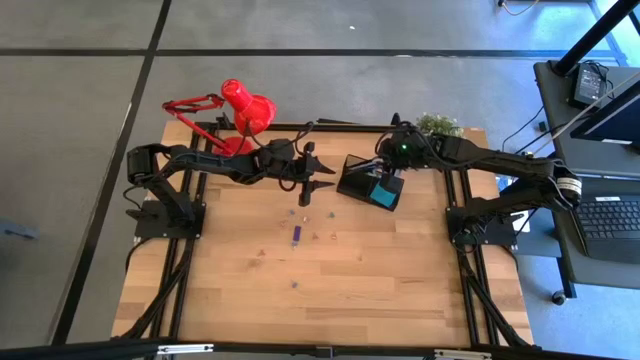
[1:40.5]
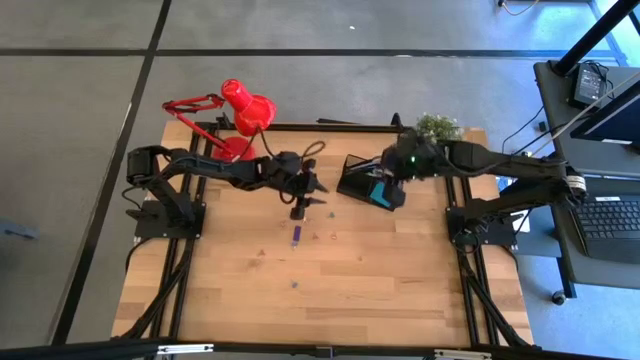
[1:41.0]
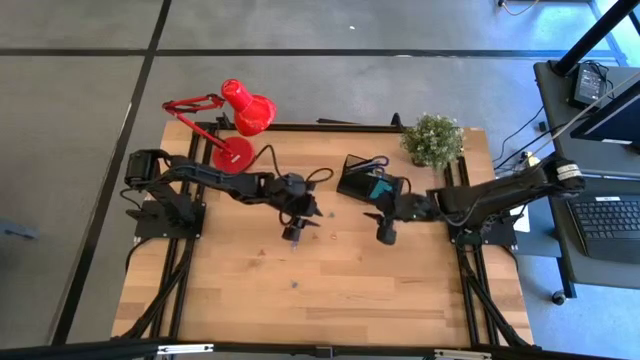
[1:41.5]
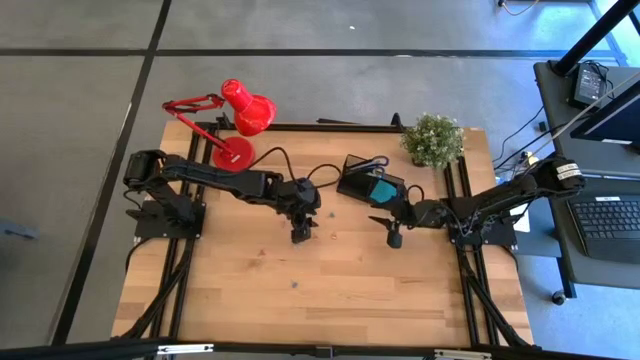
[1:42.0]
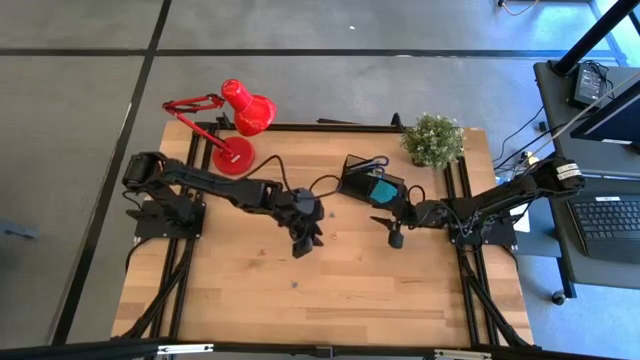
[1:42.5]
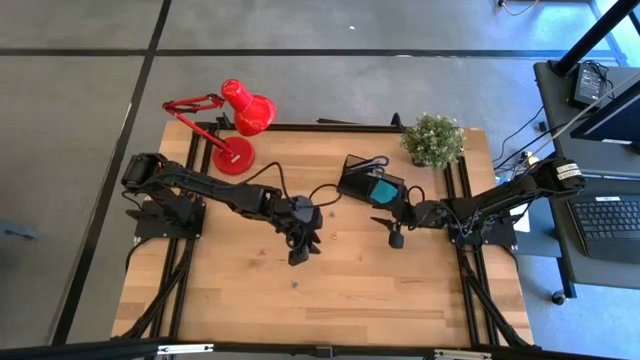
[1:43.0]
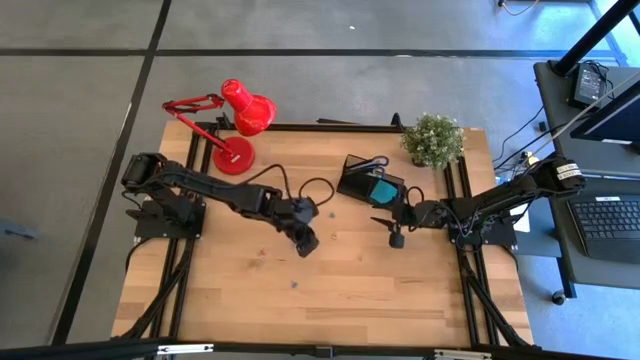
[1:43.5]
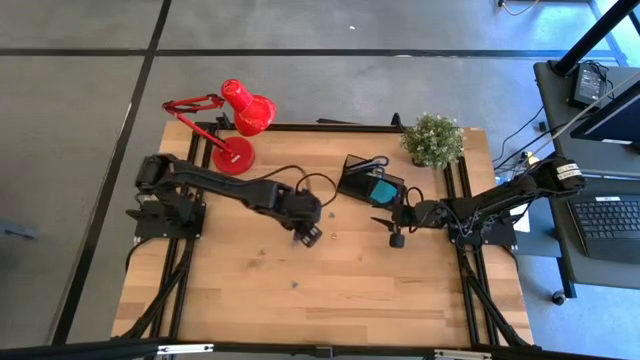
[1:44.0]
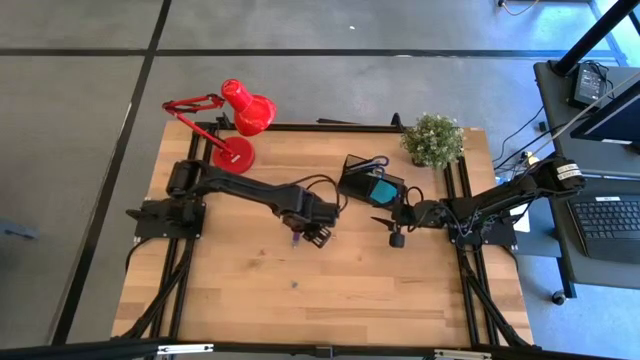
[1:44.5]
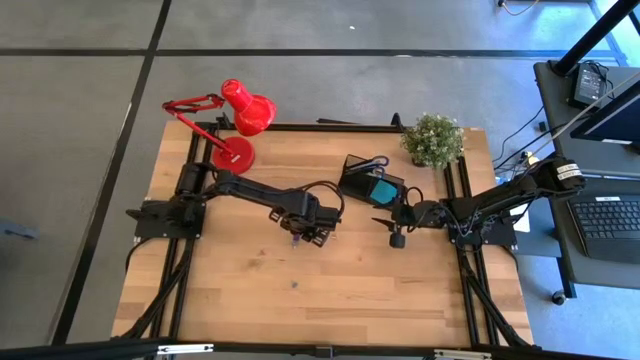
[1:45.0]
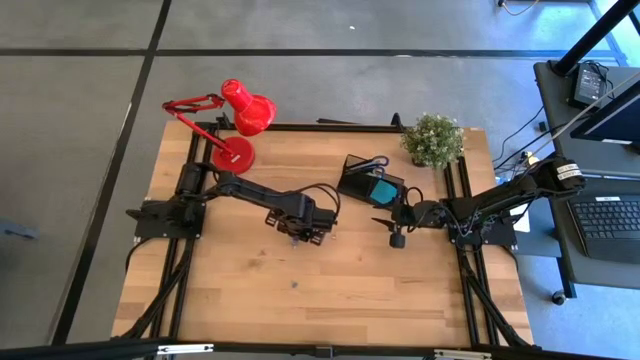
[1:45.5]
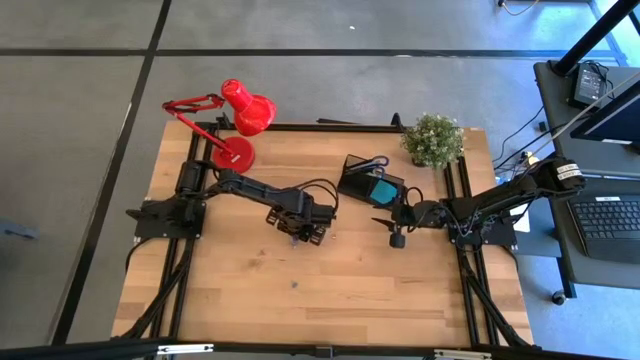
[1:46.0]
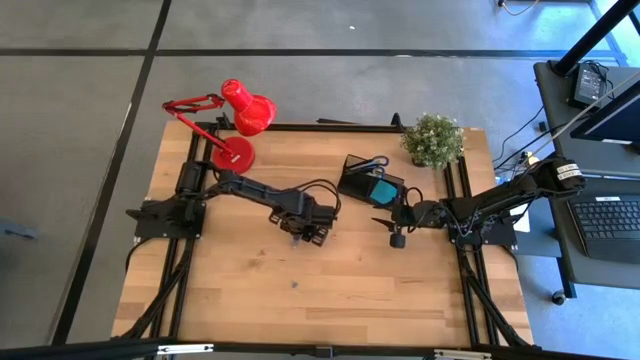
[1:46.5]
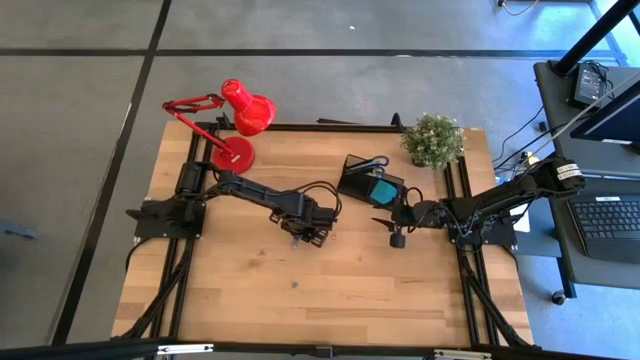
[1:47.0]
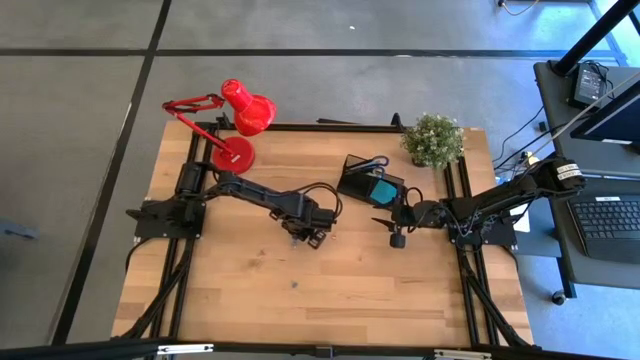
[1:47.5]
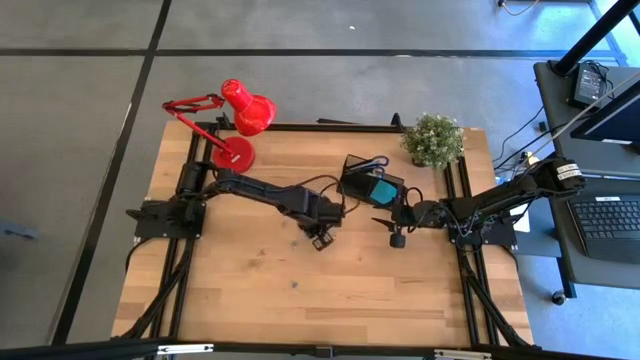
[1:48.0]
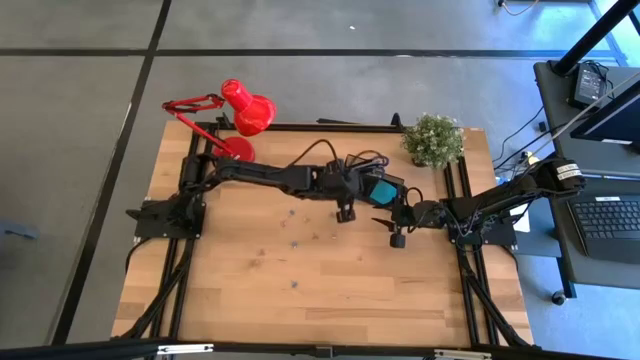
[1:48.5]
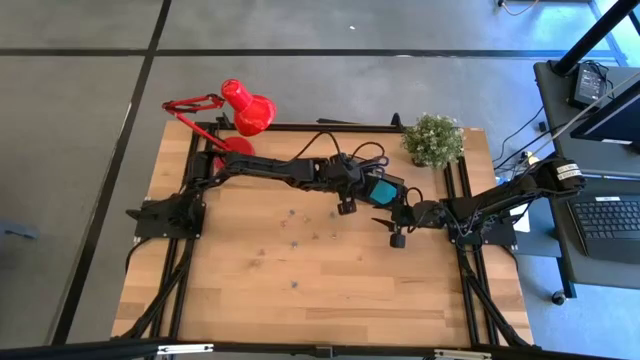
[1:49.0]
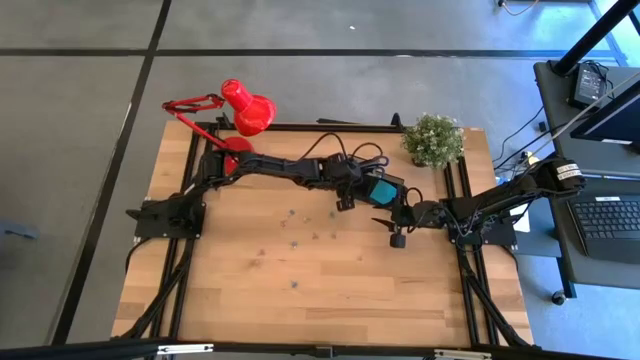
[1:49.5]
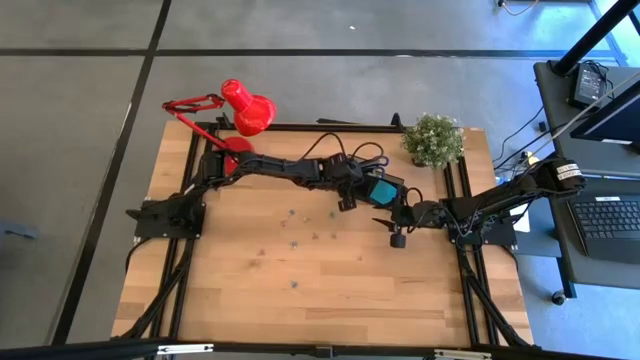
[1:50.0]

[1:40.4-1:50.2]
Task: Pick and place office supplies into organizer
Put the blue eraser into the black desk organizer

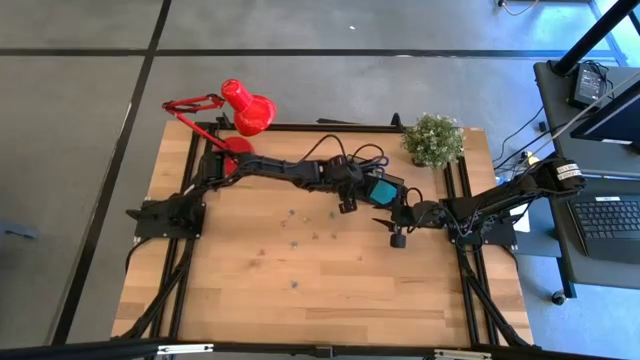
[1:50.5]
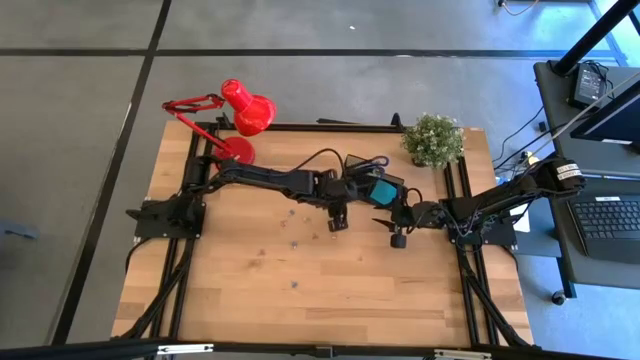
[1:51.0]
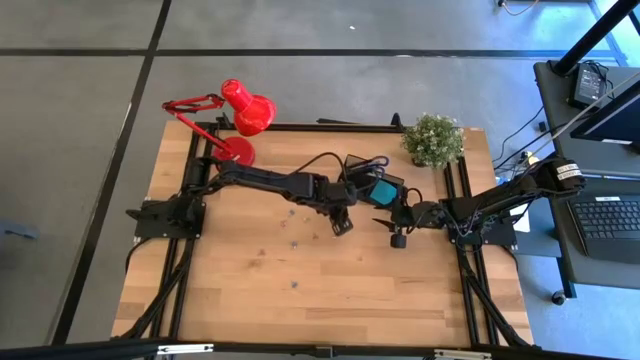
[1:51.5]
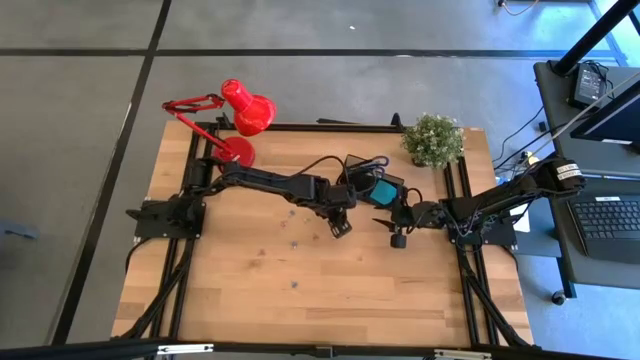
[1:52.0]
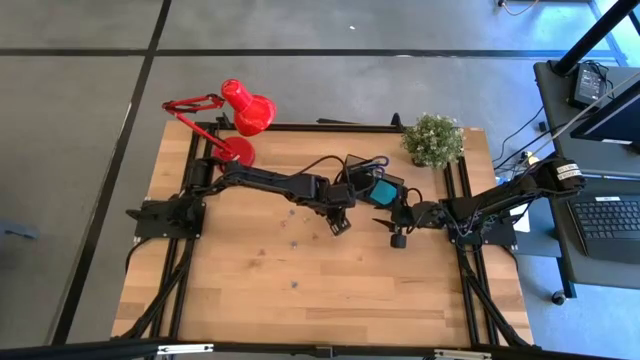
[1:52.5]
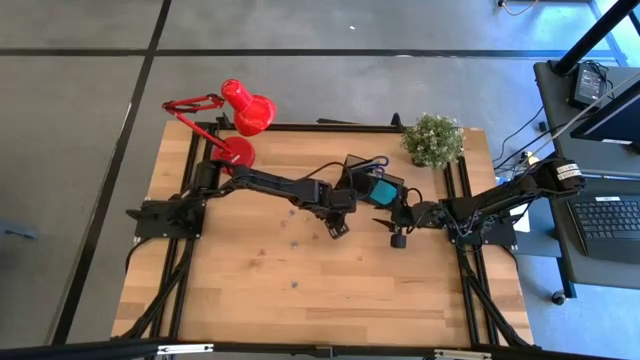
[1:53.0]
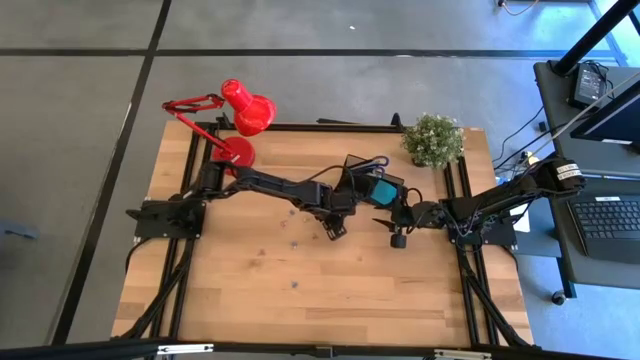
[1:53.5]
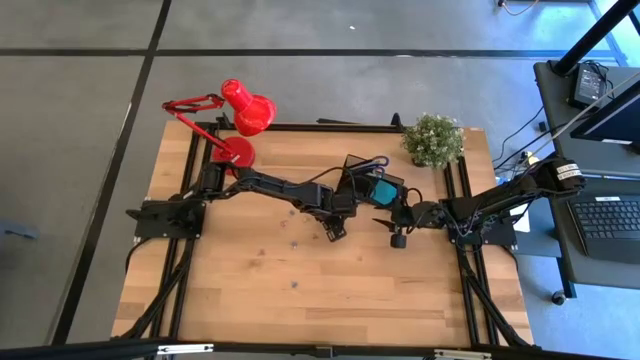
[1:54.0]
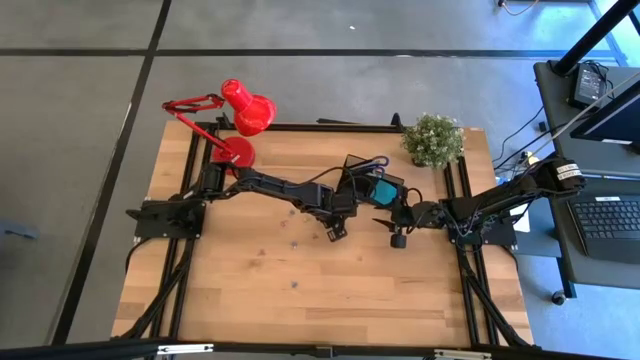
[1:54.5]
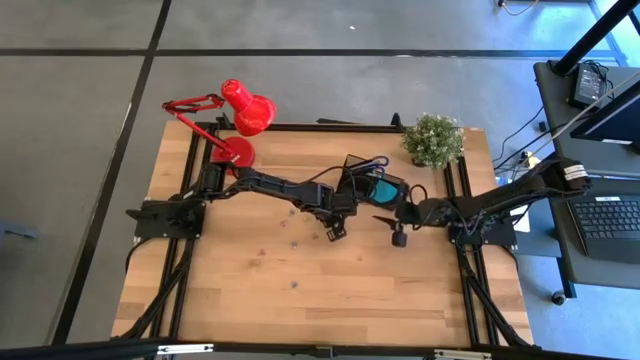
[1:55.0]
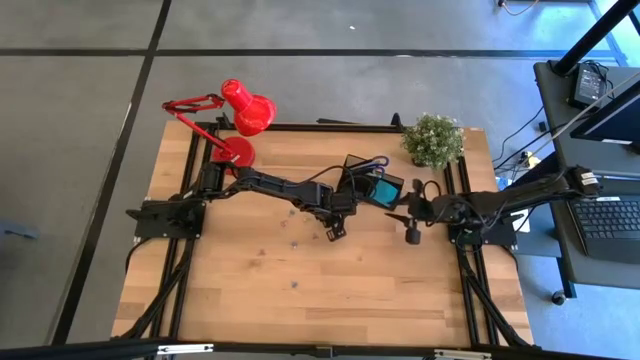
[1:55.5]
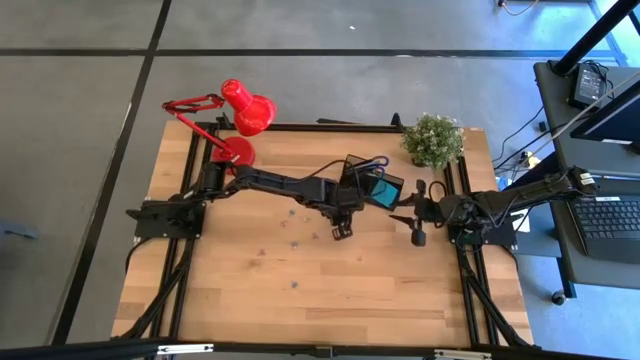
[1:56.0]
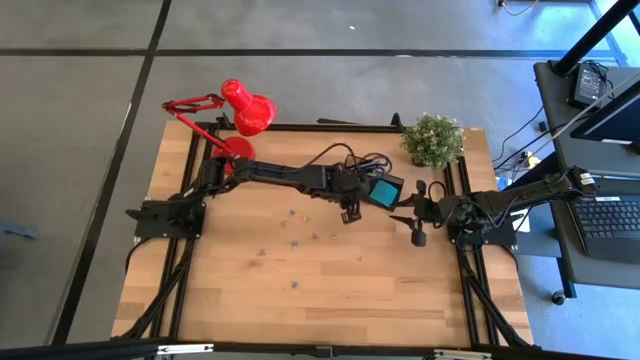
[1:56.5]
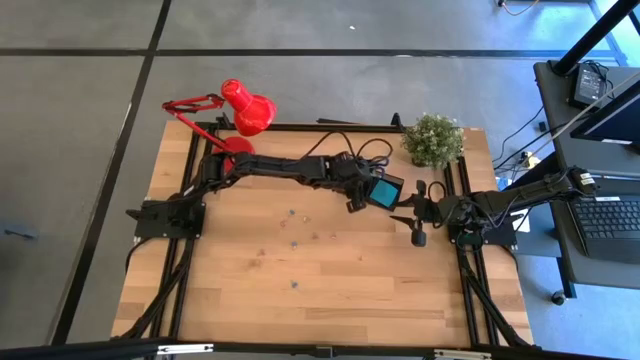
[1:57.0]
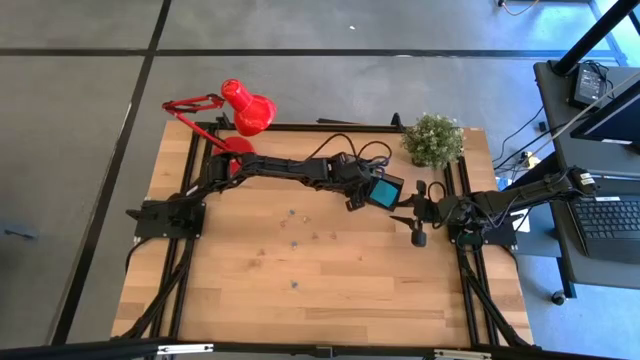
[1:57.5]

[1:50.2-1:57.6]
Put the blue binder clip into the black desk organizer

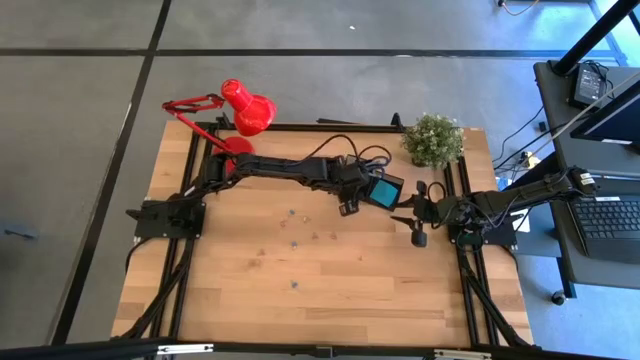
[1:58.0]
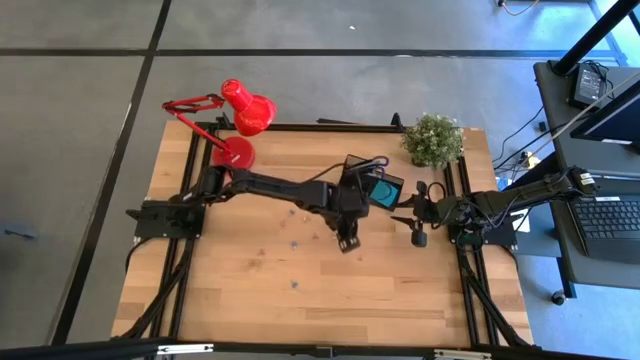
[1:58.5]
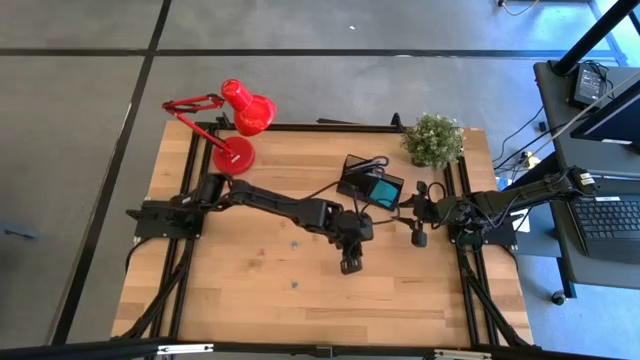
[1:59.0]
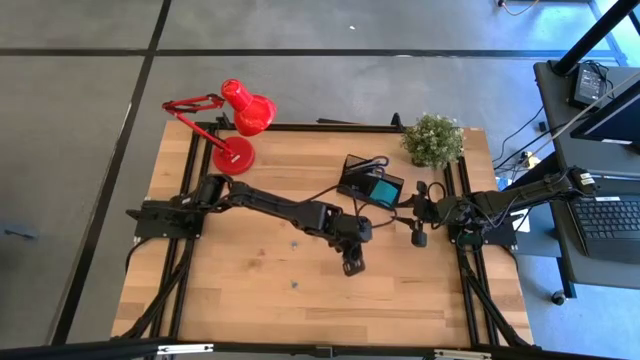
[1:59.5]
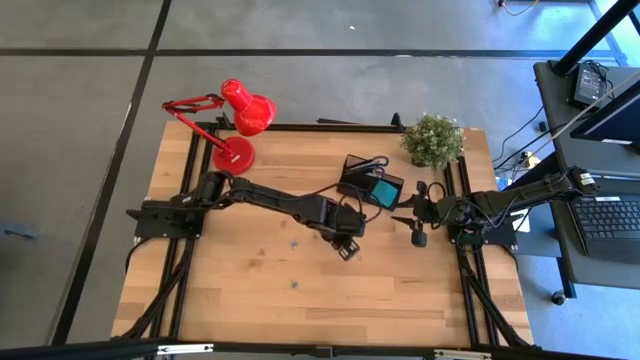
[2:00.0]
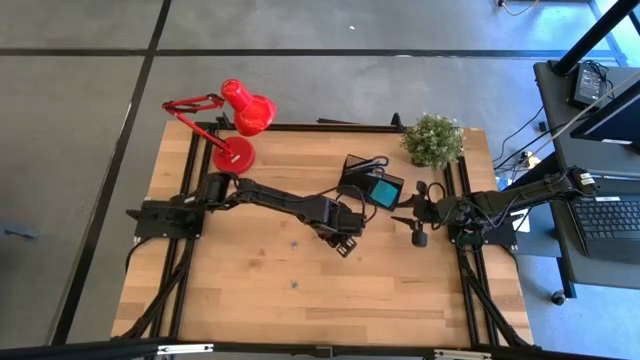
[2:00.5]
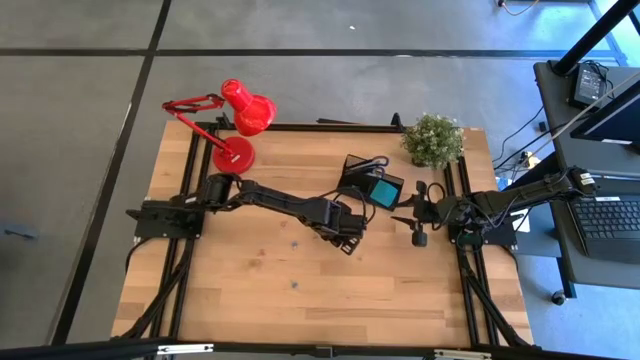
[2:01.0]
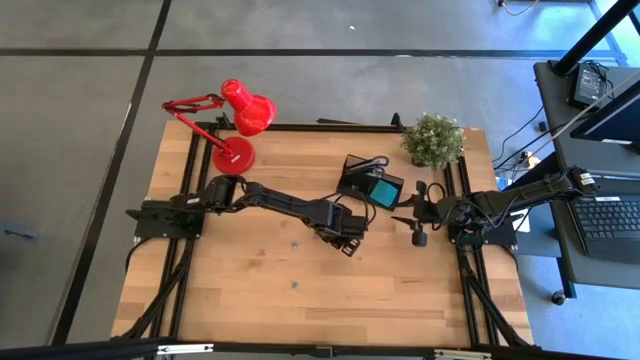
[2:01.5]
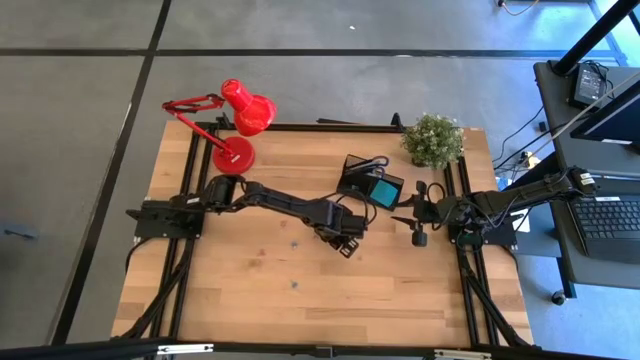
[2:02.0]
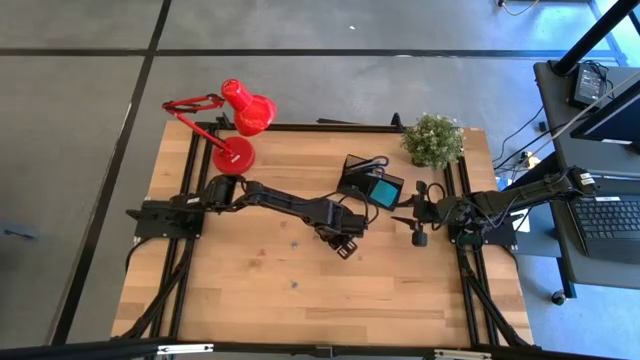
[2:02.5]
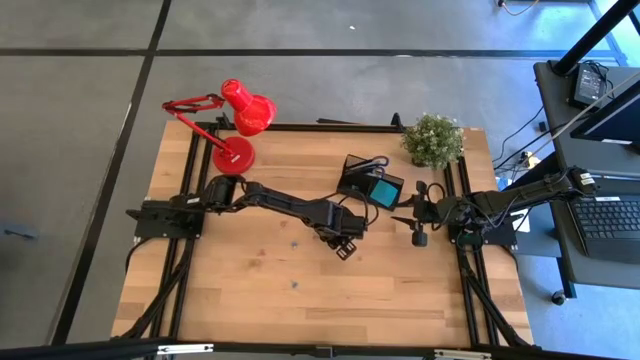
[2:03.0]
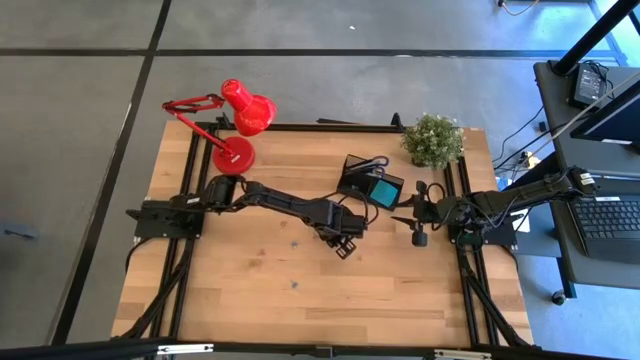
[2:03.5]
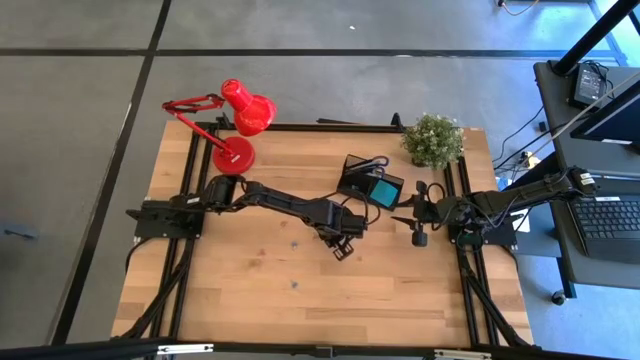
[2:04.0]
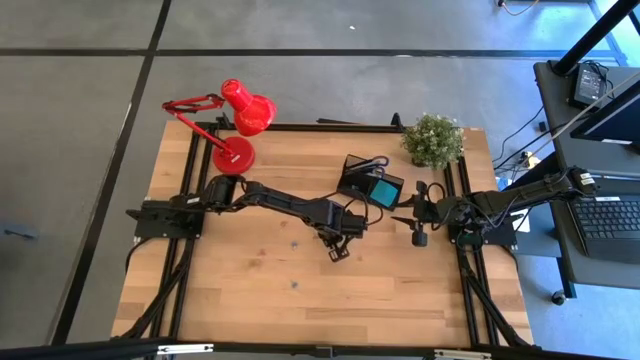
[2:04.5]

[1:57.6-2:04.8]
Put the pink binder clip into the black desk organizer
